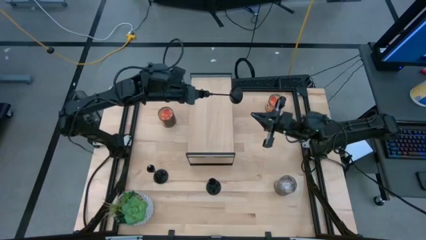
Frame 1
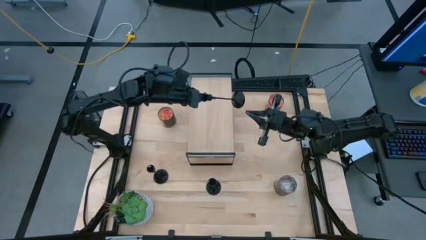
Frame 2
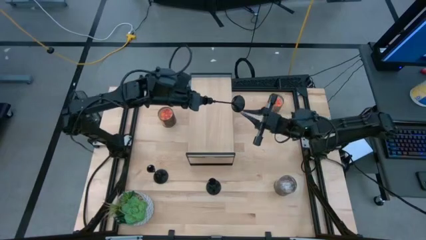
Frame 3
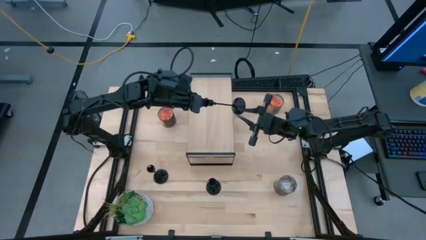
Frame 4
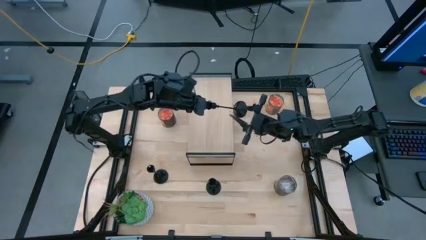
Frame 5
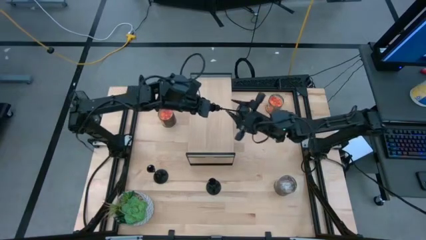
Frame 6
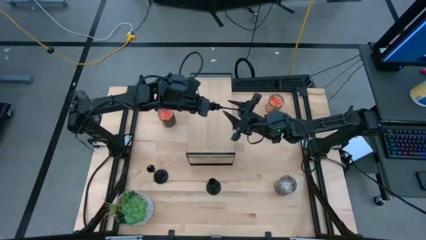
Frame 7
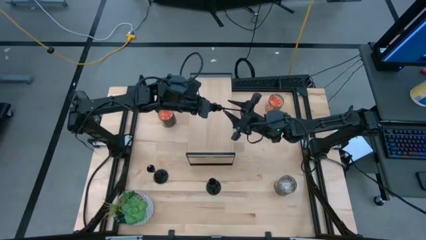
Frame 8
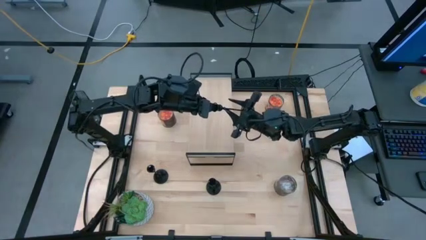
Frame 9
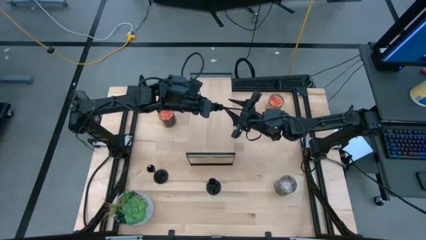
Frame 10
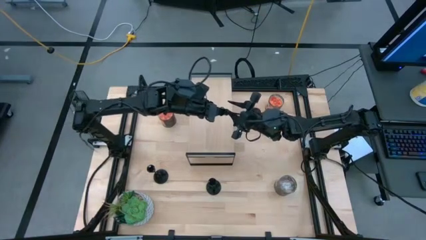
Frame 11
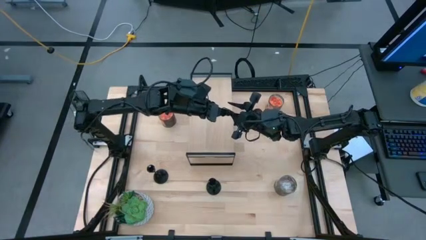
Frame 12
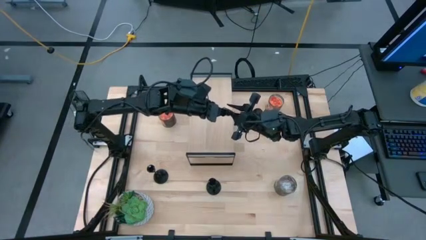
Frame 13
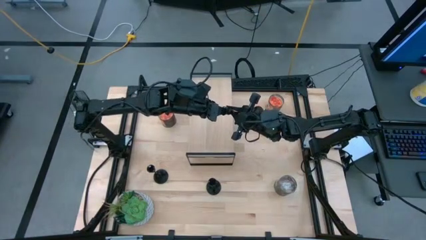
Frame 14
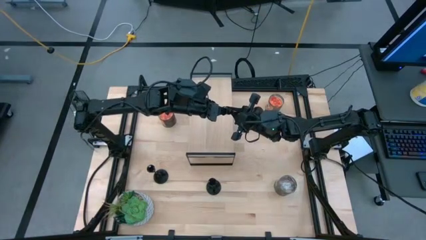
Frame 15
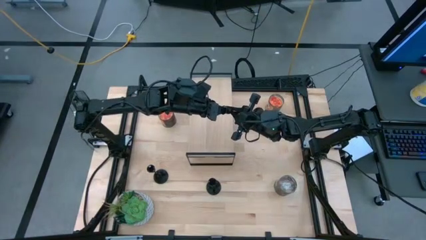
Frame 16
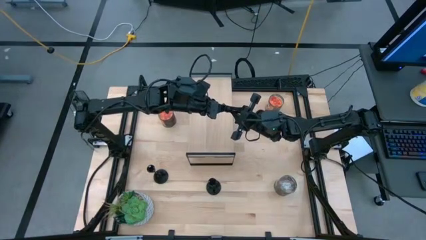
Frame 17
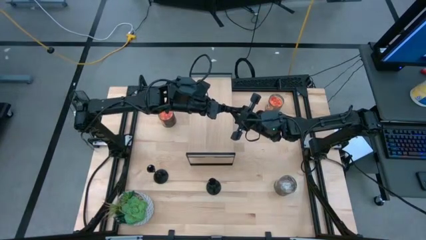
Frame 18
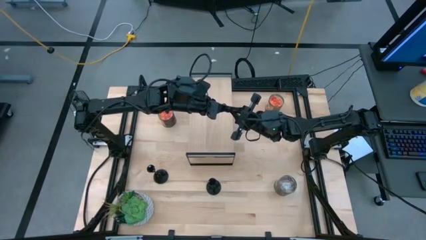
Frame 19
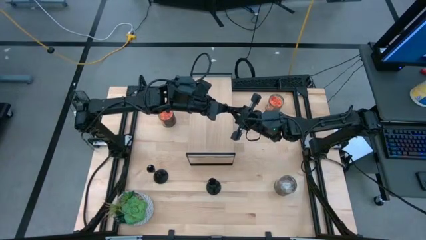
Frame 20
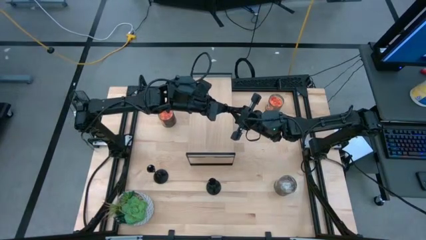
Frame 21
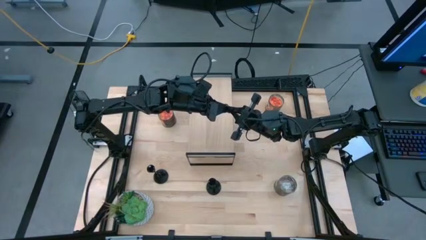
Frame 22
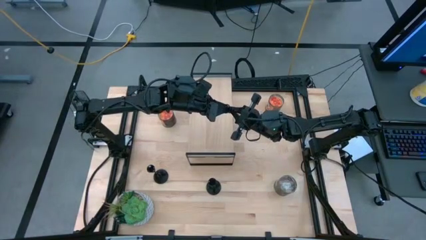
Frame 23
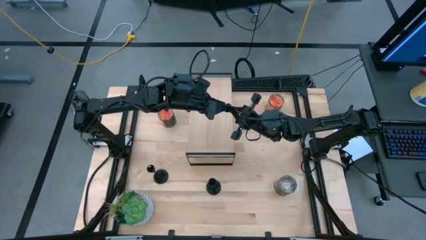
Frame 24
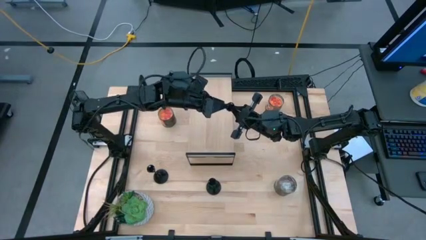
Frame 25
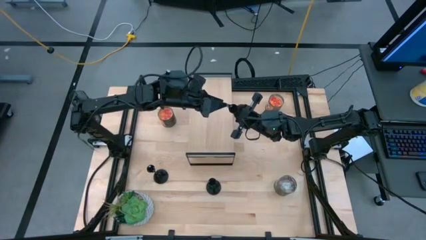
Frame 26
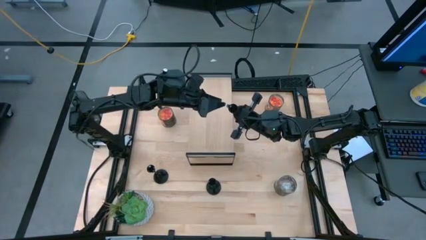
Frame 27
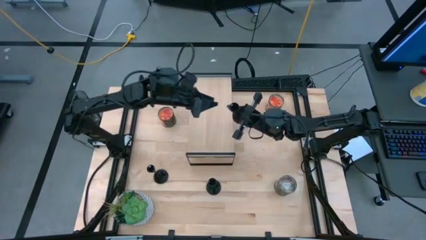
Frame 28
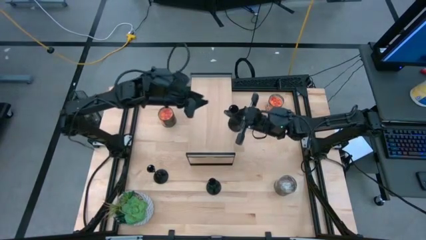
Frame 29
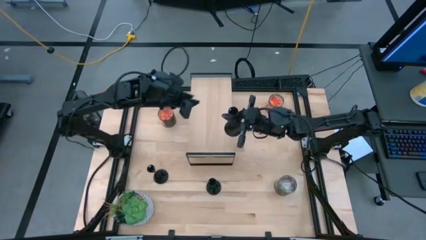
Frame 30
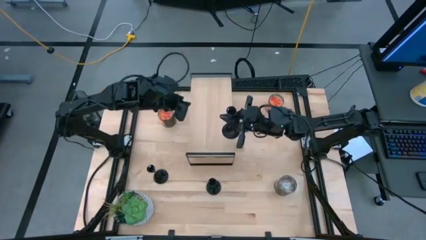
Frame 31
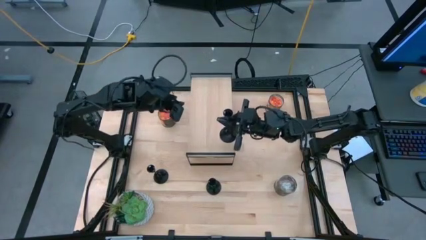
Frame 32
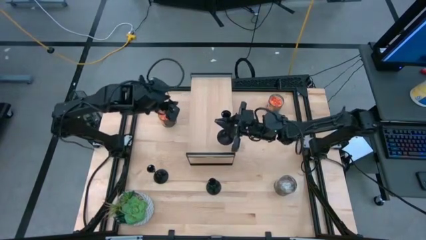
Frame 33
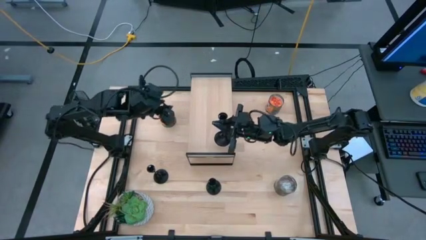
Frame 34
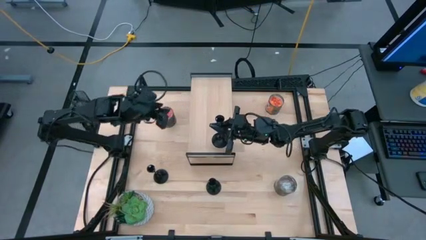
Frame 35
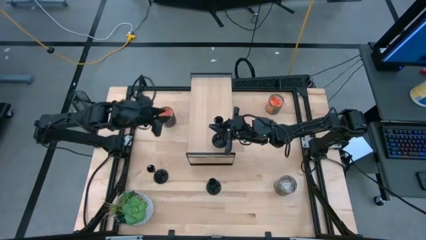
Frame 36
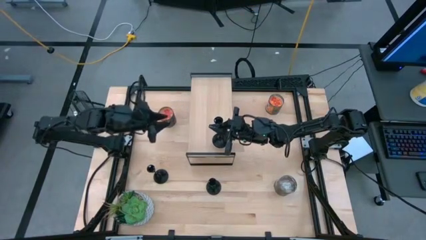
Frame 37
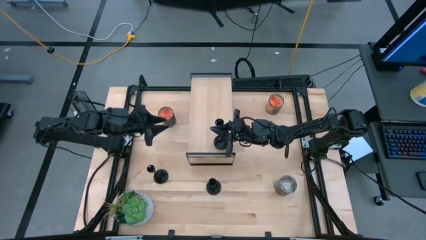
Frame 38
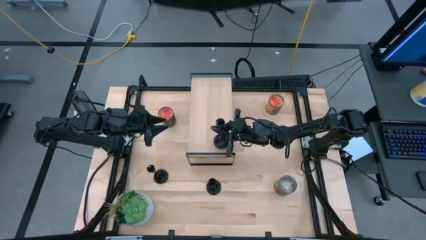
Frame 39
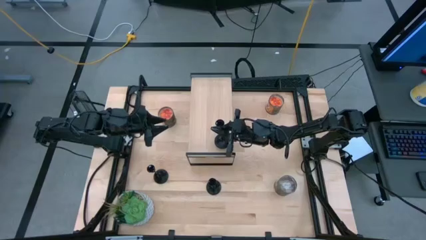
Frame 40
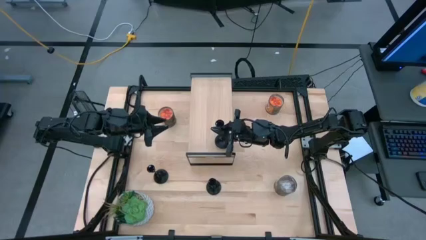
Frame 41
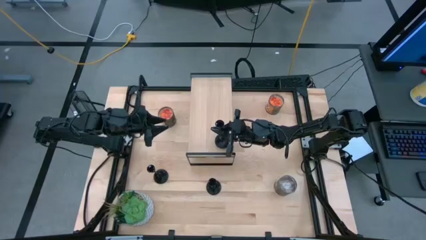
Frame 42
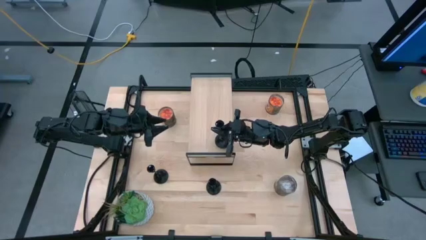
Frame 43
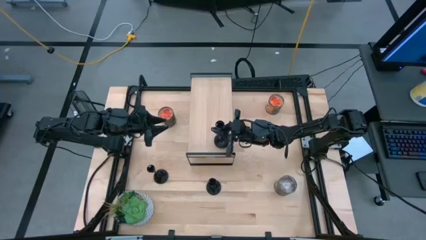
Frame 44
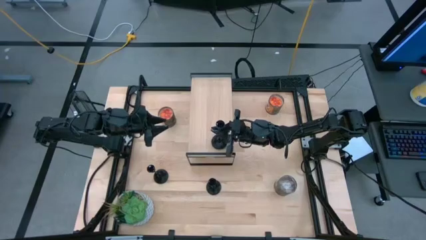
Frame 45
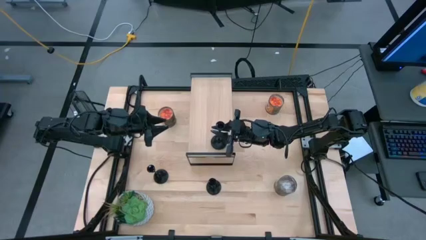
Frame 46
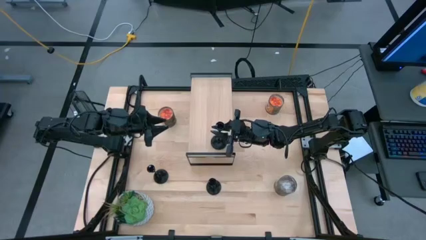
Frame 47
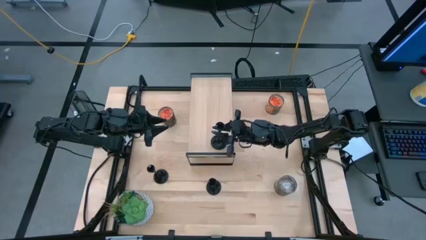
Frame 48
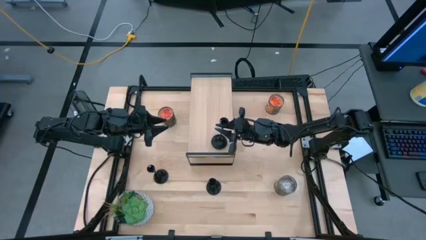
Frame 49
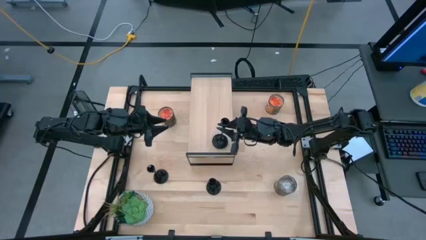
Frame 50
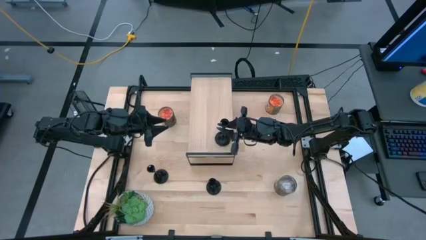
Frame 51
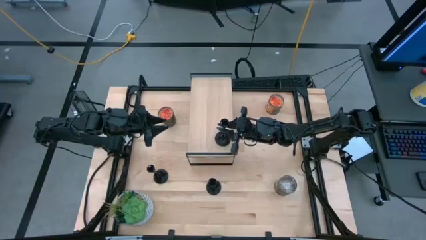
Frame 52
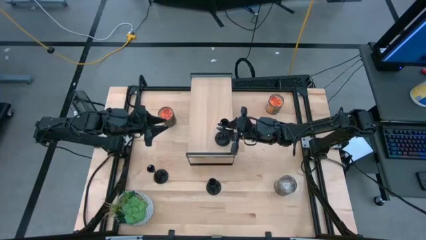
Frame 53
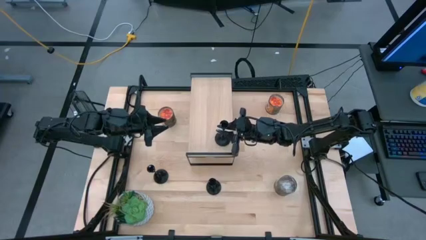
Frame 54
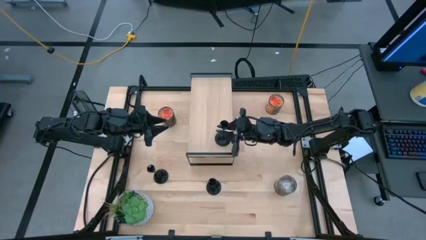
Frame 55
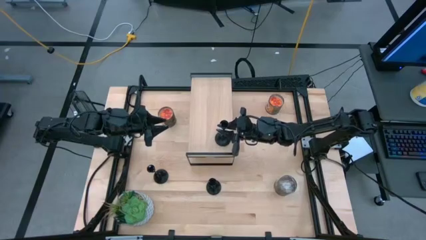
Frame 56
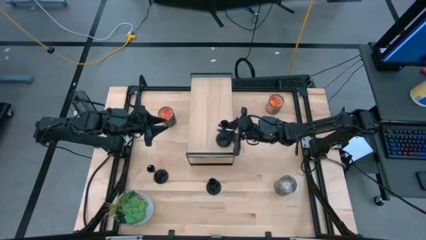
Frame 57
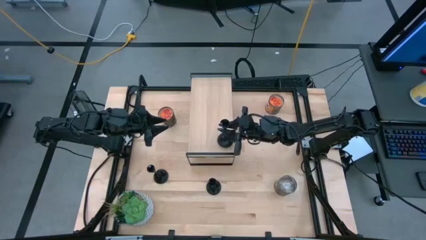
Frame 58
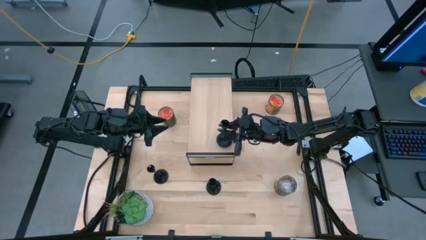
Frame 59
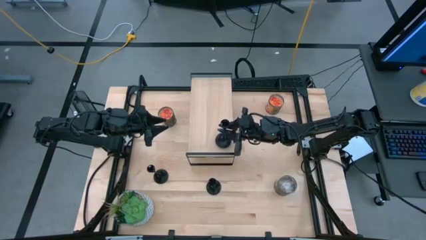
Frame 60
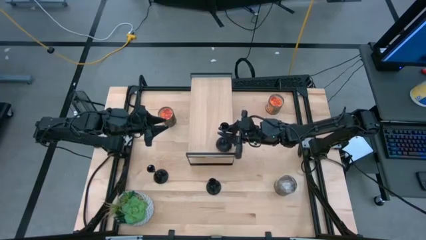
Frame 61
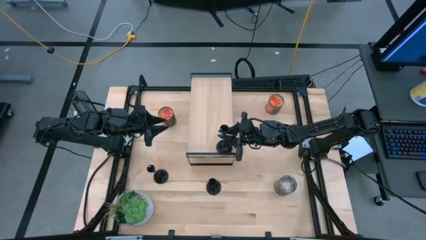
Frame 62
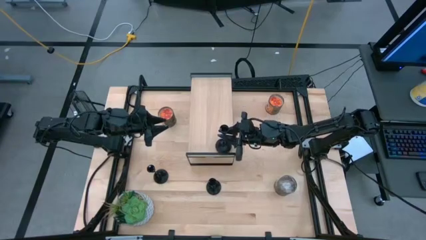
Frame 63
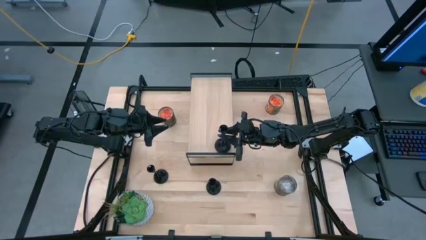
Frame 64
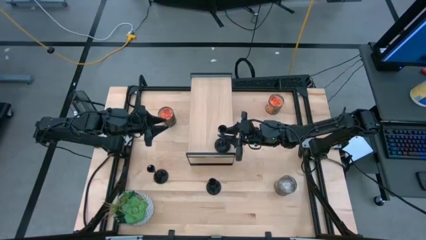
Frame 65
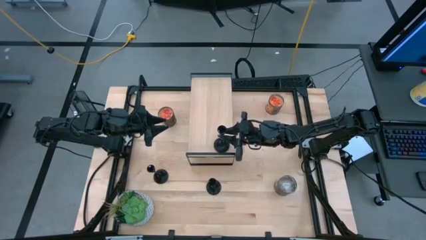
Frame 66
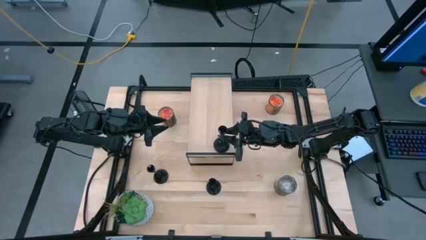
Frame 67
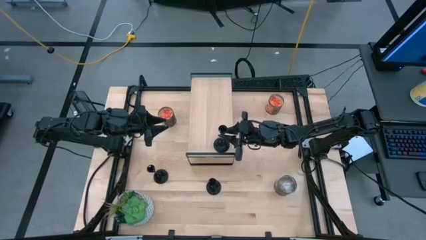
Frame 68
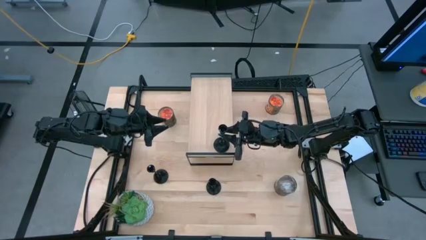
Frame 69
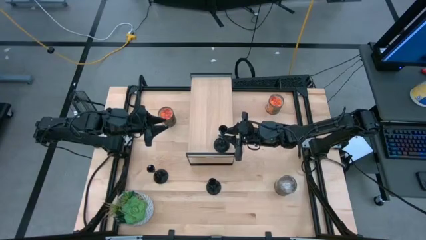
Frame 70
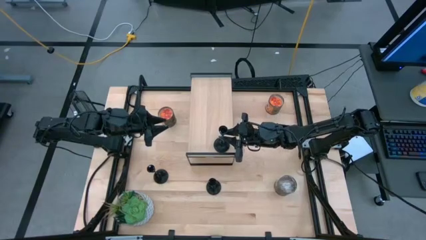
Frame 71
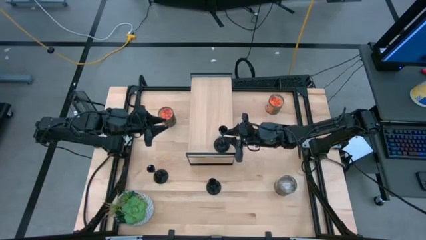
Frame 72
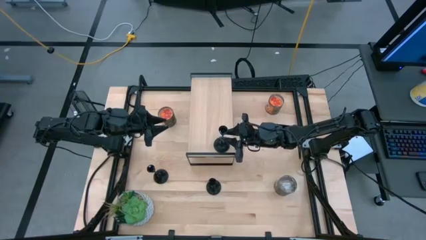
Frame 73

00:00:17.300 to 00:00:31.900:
Task: Pick & Place candle stick holders
Put the top left black candle holder on the shelf

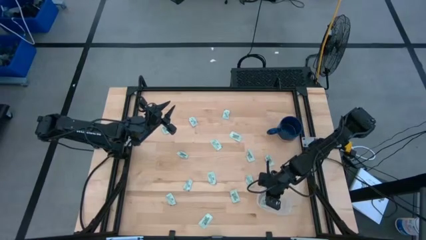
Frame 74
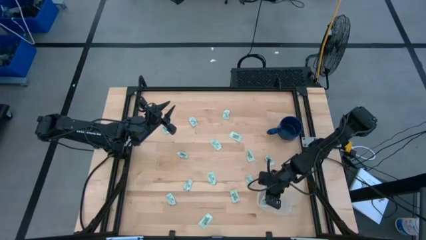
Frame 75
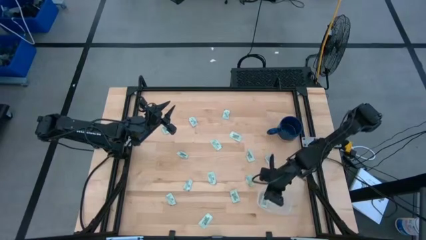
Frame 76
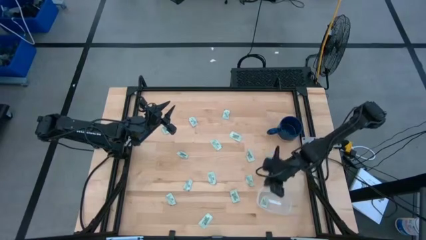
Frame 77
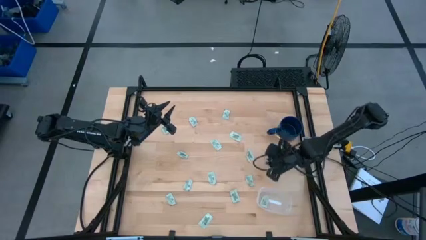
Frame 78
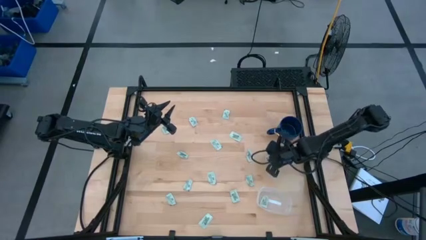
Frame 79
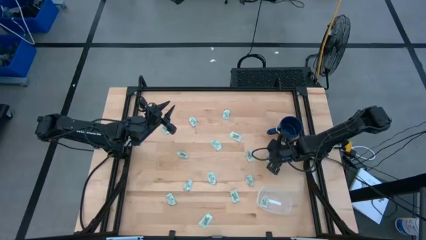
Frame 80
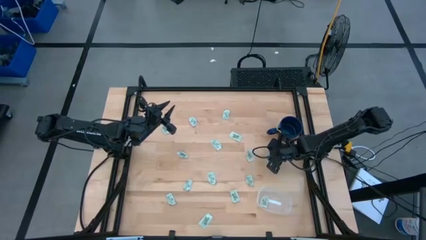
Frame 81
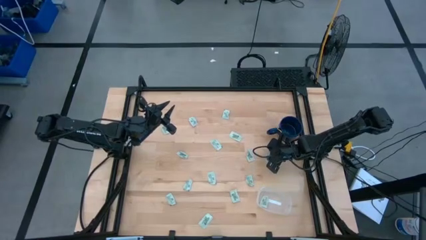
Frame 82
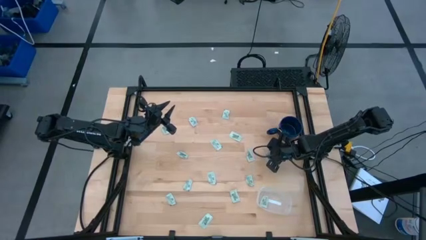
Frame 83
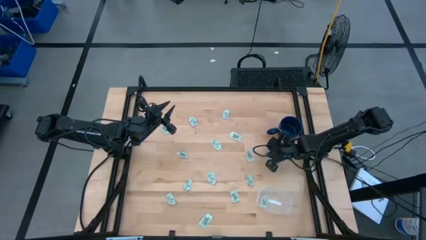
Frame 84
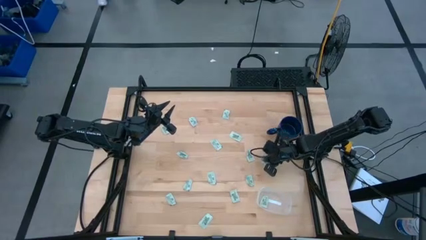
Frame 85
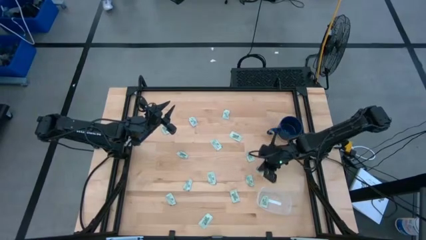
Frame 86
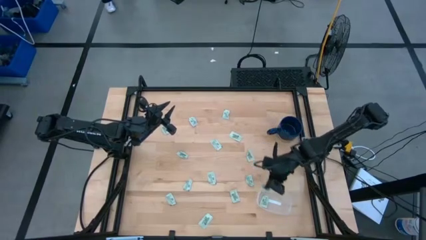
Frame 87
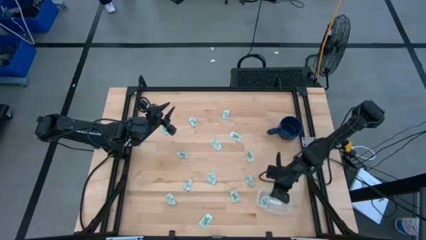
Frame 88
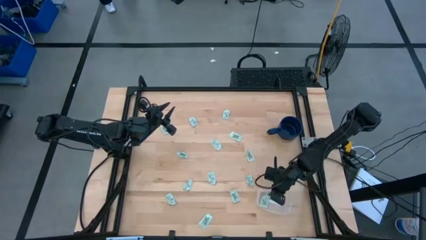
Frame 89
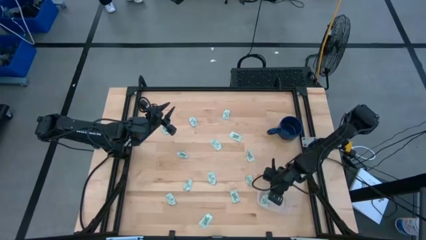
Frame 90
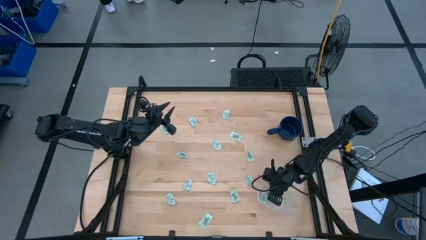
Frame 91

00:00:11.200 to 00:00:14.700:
Task: Pick and place Stevia / Truvia into bins
Put the stevia packet into the transparent container
